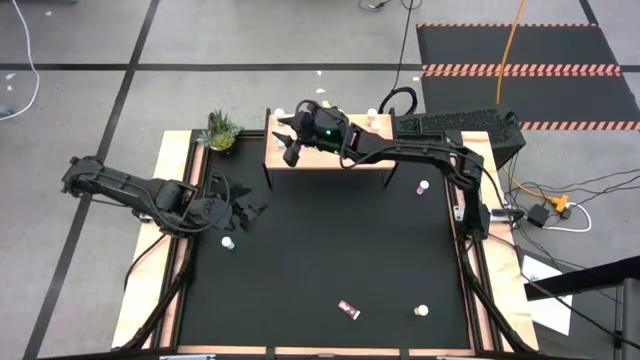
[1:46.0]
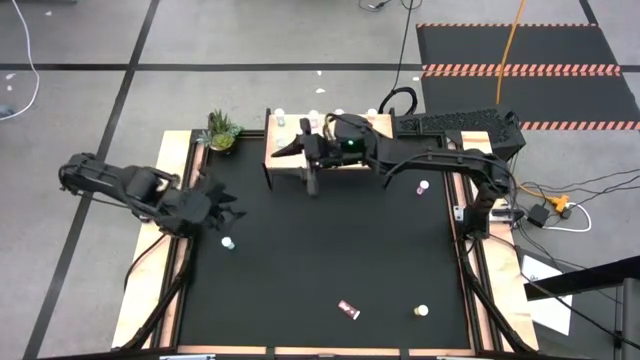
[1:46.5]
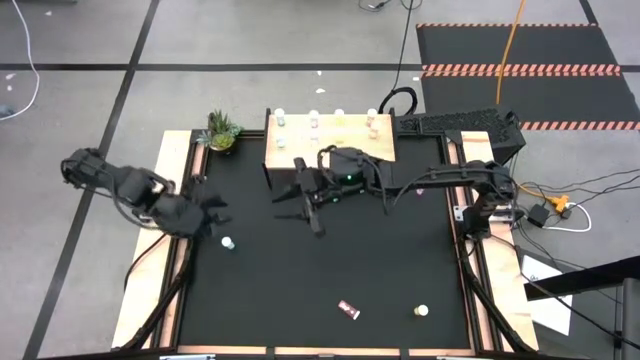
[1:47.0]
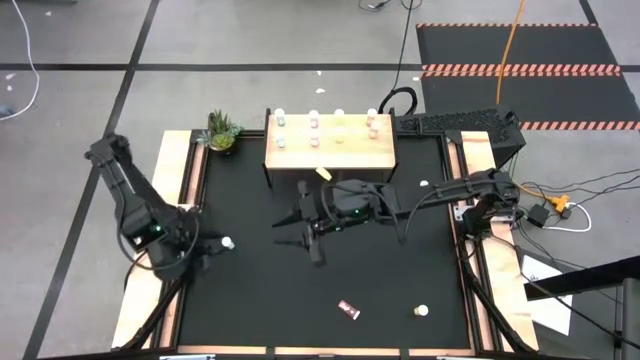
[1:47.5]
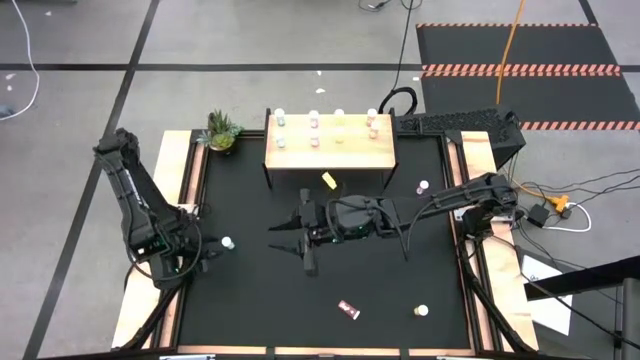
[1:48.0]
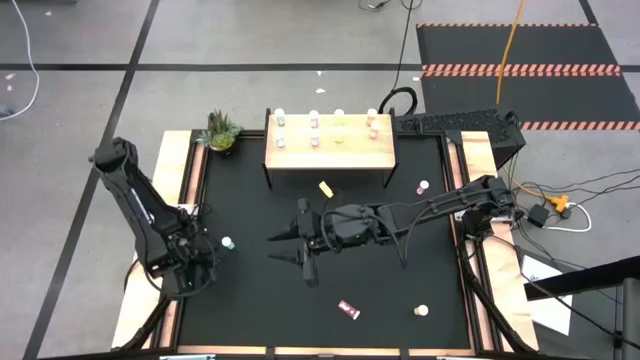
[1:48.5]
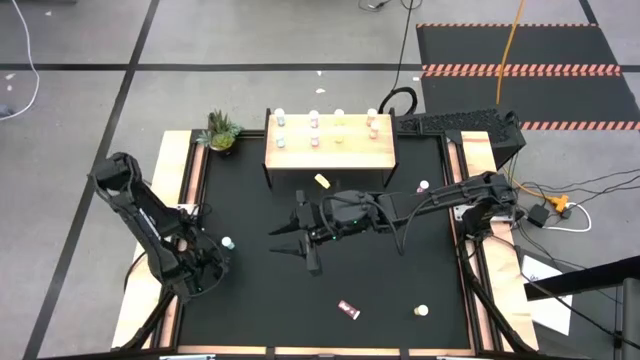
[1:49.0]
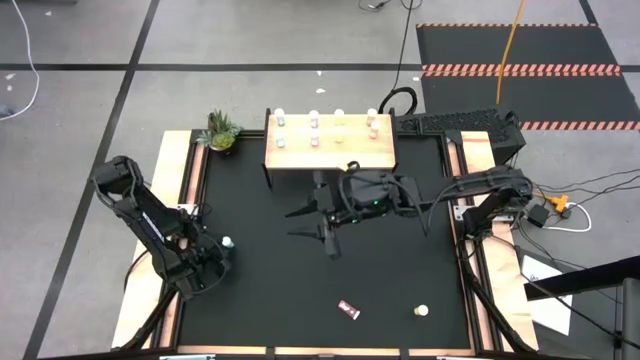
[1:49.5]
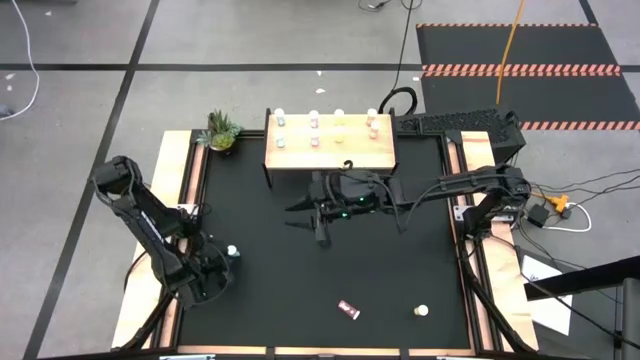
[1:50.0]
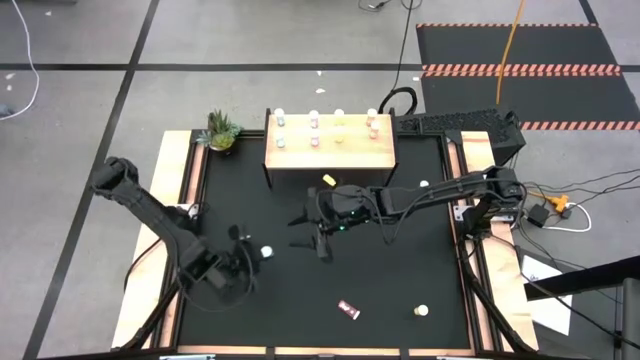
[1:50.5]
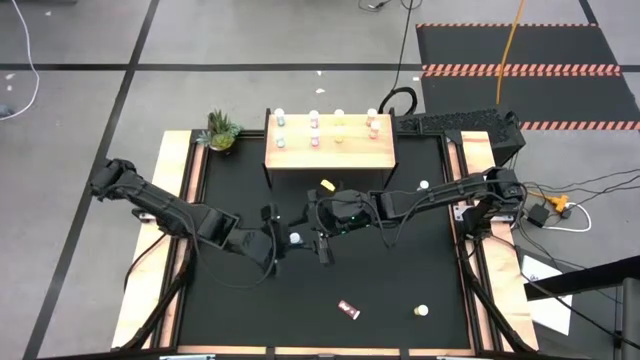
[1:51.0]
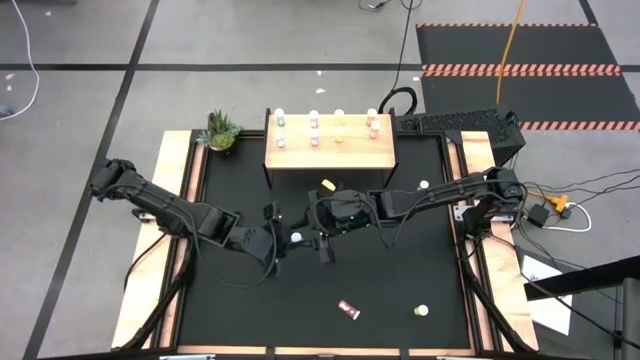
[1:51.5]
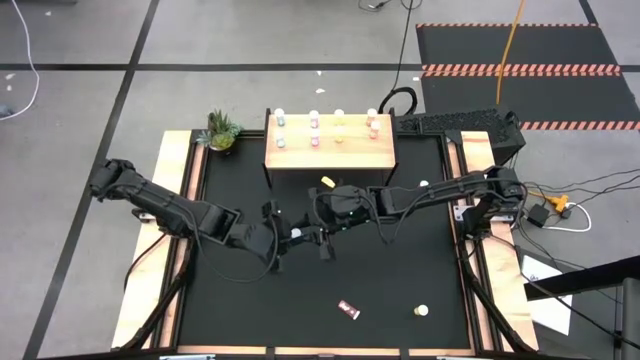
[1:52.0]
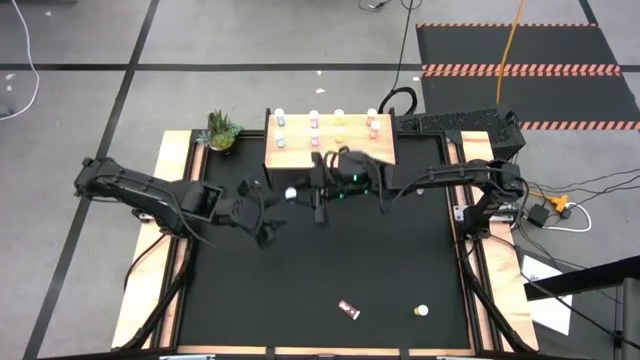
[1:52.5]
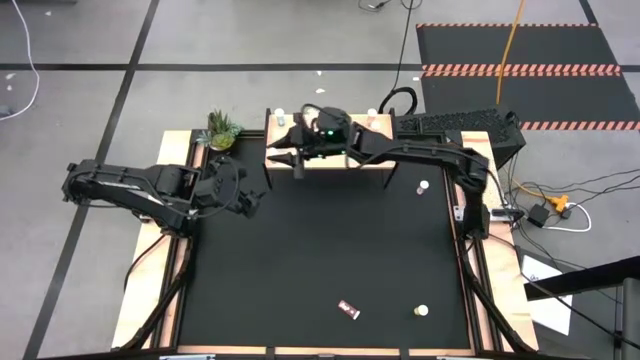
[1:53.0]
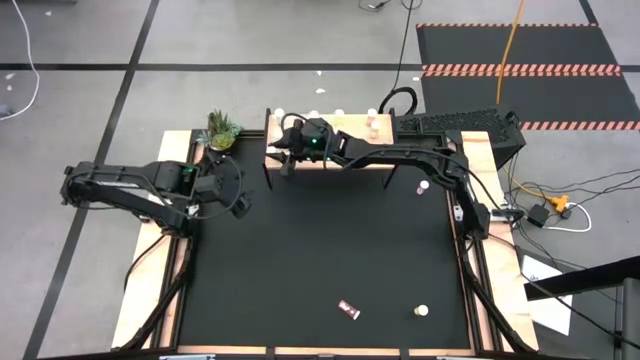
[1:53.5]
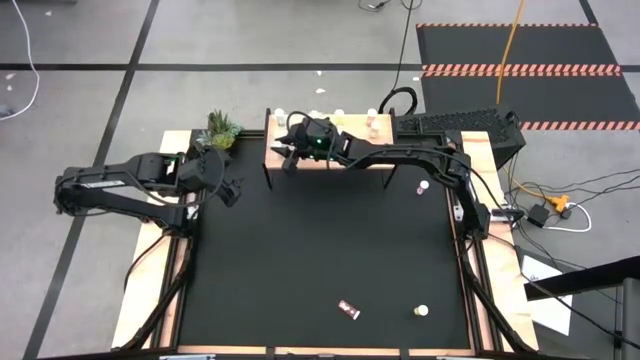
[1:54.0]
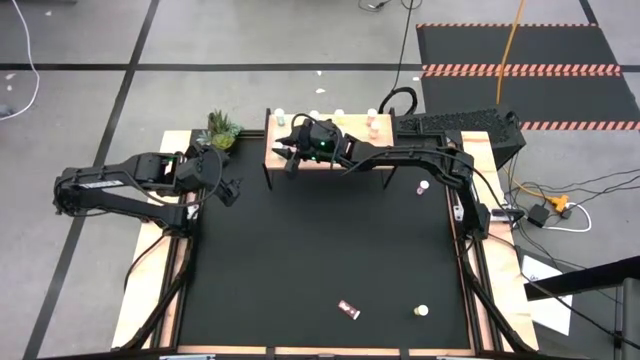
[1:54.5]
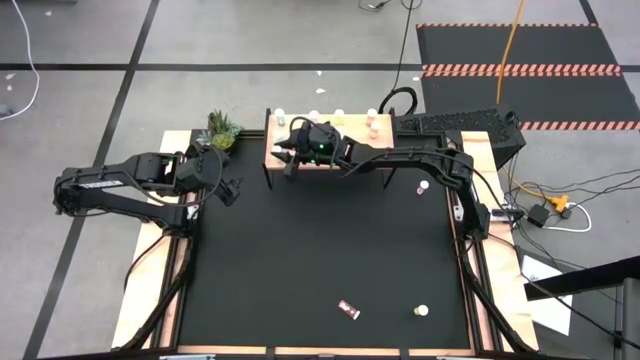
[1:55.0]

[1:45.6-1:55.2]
Task: Pick and place medicine bottles onto shelf by color
Put the blue pill bottle aligned with the other blue pill bottles on the shelf

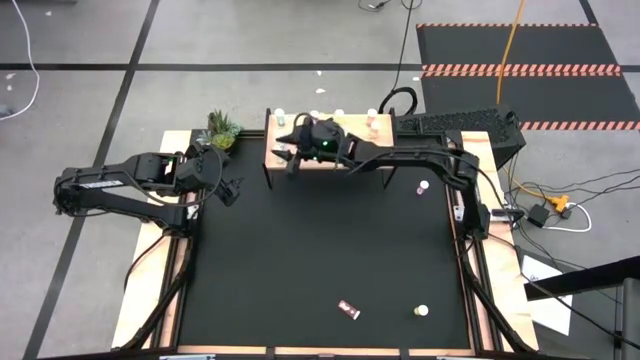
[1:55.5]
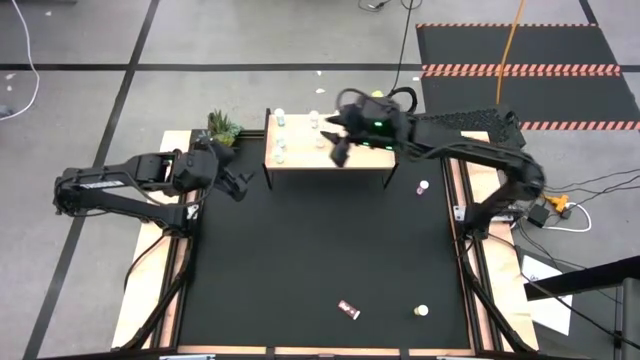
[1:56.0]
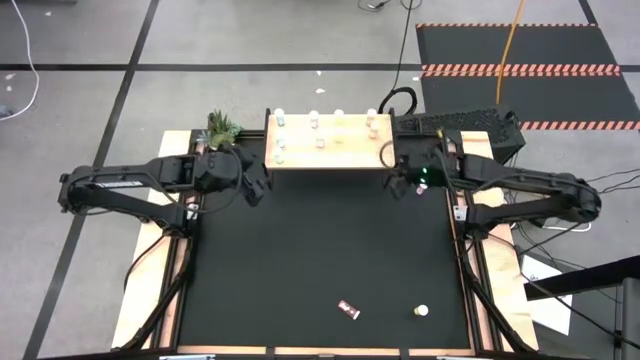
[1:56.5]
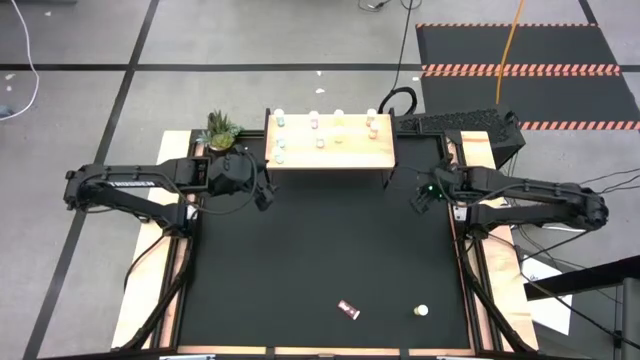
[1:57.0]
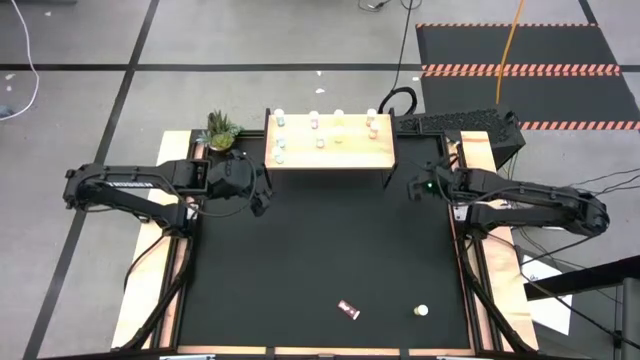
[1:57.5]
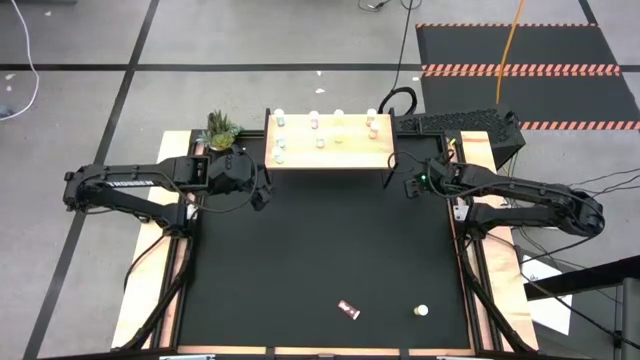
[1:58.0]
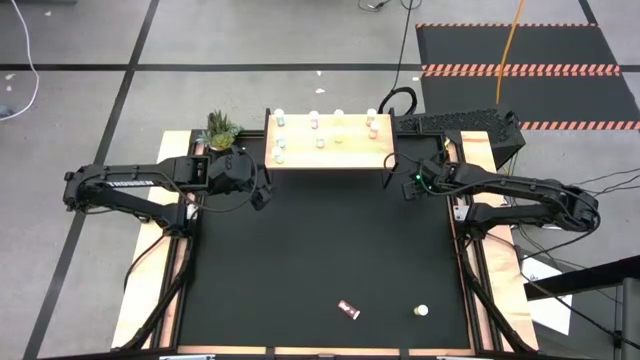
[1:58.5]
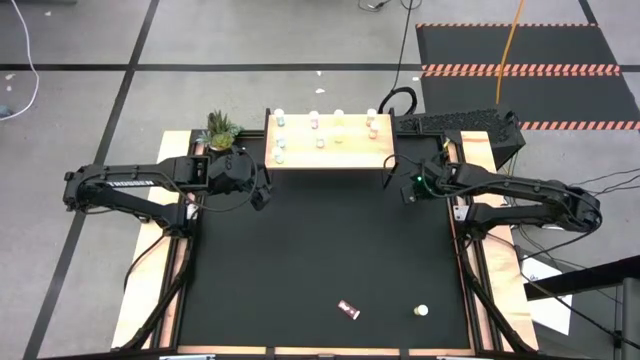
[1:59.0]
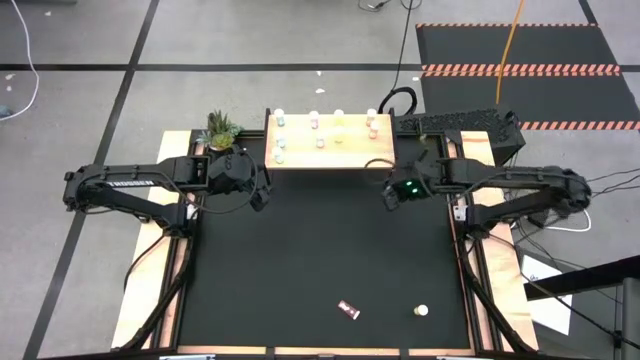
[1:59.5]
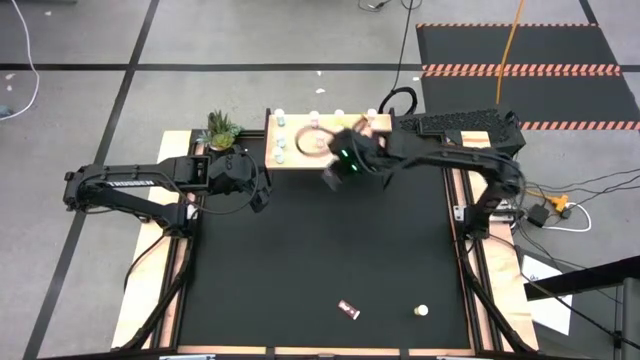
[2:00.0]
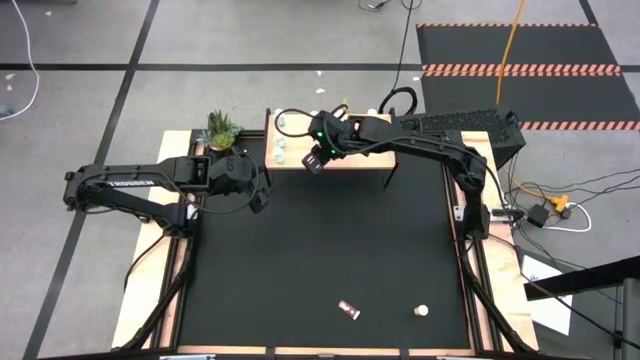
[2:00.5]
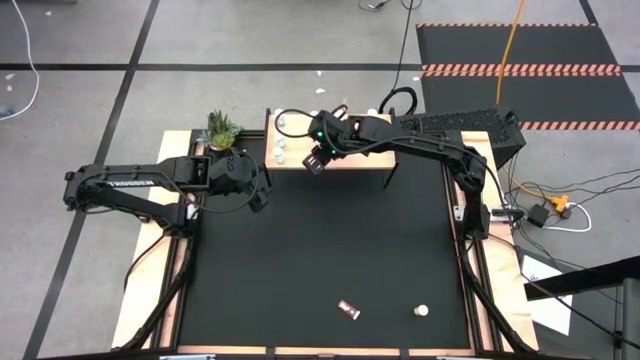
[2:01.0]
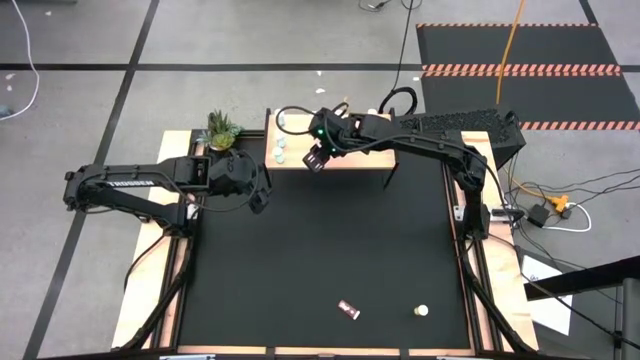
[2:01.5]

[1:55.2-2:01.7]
Put the violet pill bottle aligned with the other violet pill bottles on the shelf

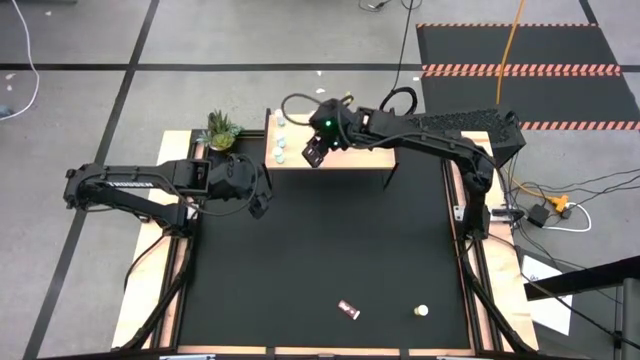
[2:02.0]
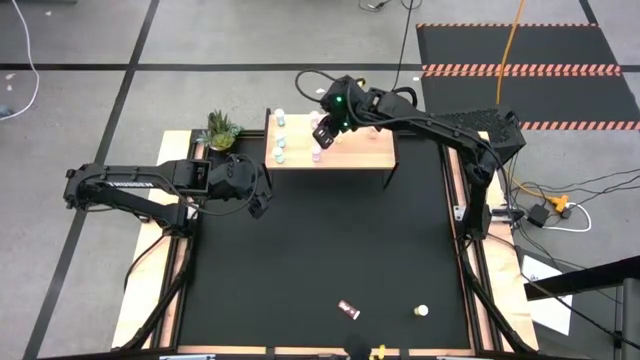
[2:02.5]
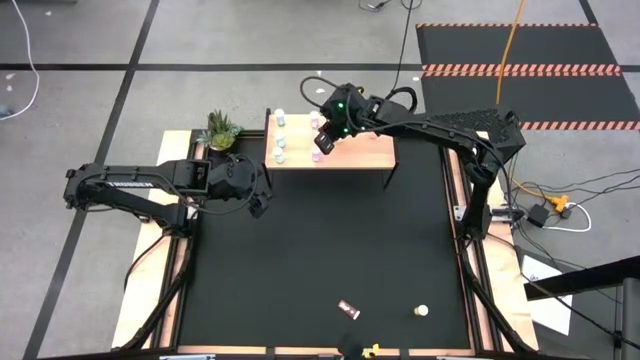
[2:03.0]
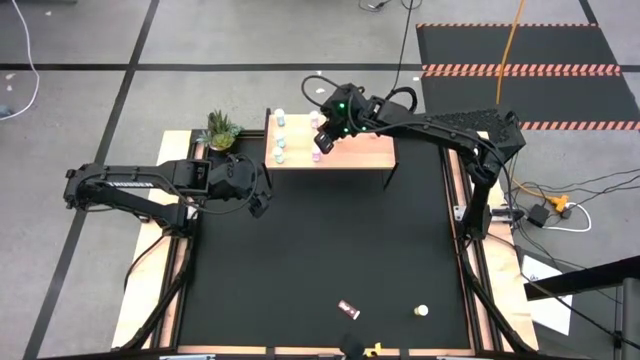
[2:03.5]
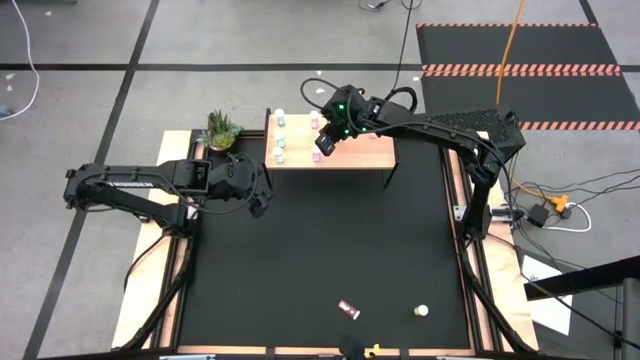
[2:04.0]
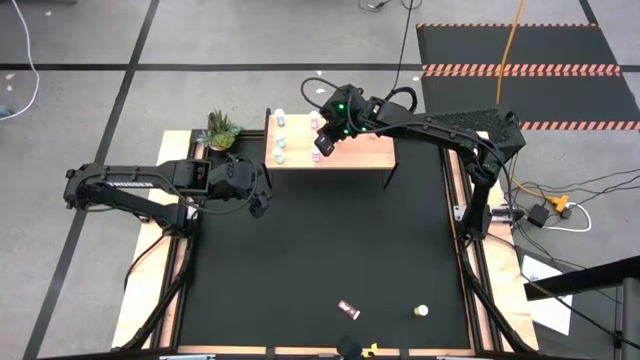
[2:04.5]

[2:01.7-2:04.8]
Adjust the violet pill bottle on the shelf

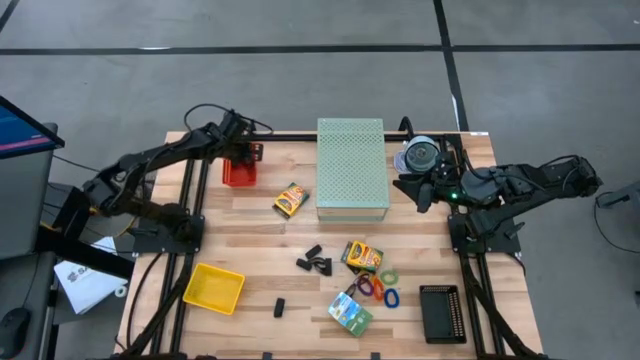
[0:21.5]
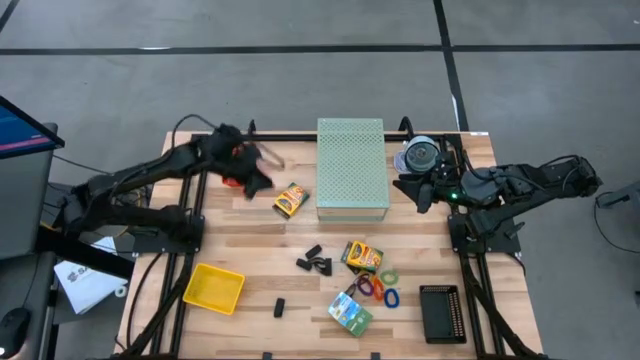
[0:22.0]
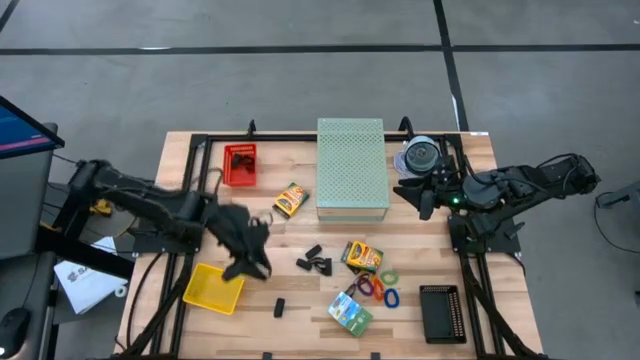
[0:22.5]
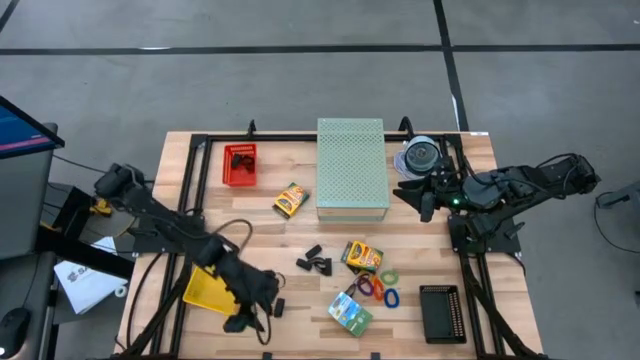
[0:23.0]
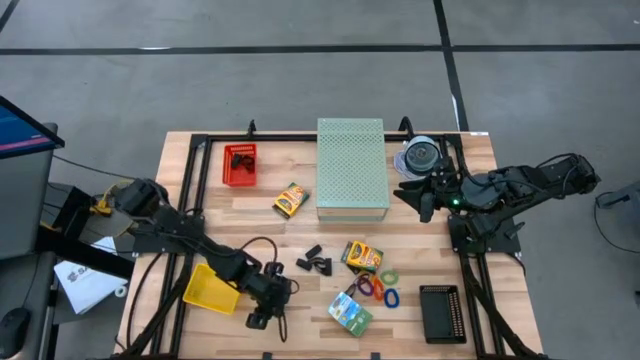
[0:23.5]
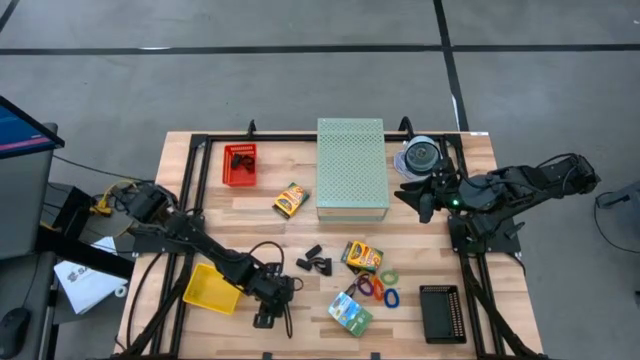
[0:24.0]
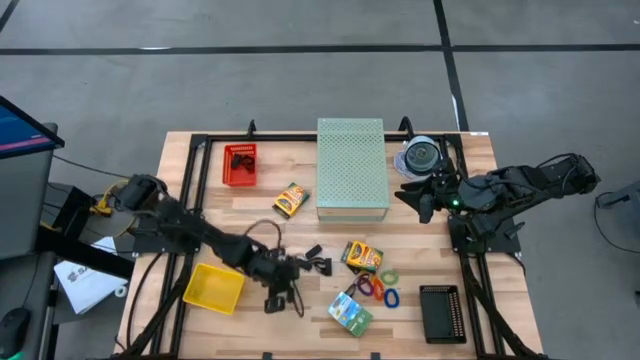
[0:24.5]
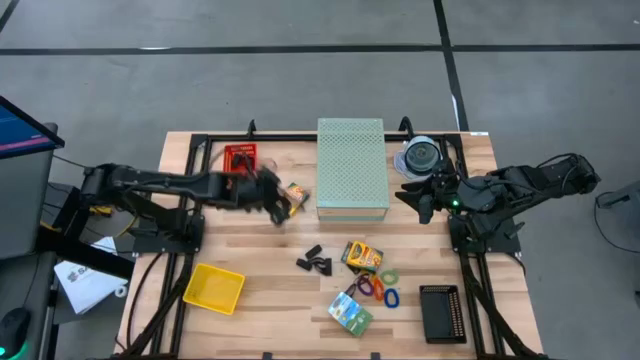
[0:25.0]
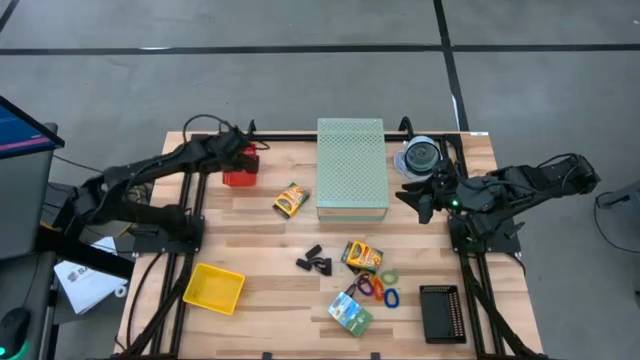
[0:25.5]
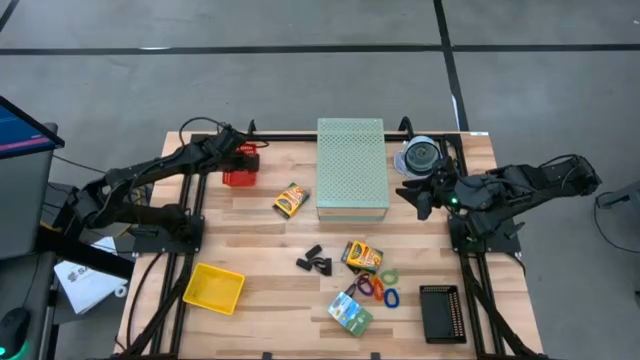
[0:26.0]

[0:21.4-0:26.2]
Task: Pick & Place Office Desk Supplies
Put the black rubber band into the red bin
